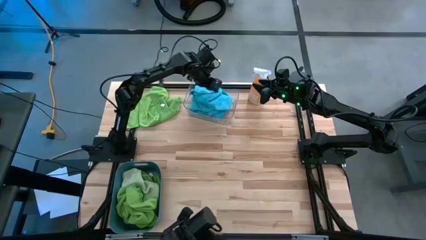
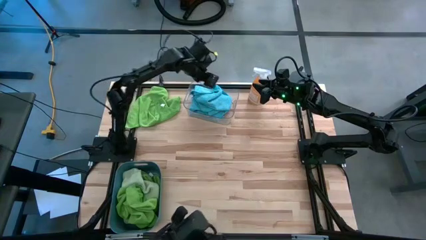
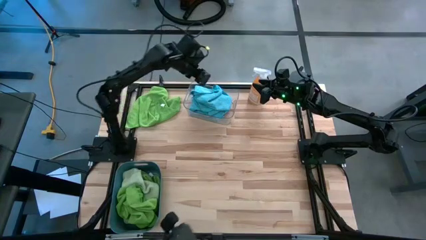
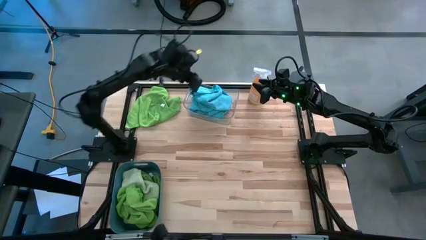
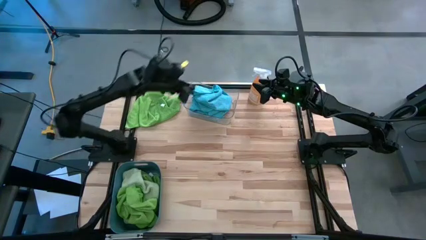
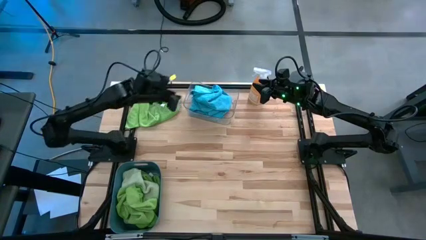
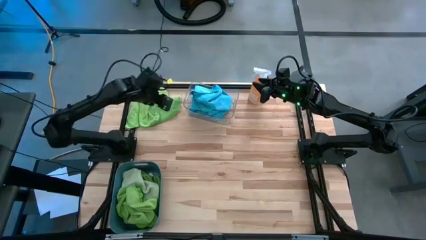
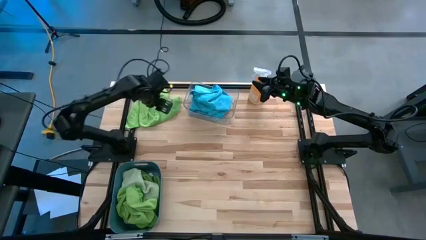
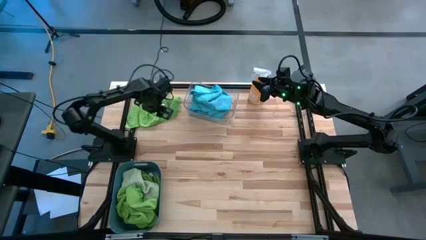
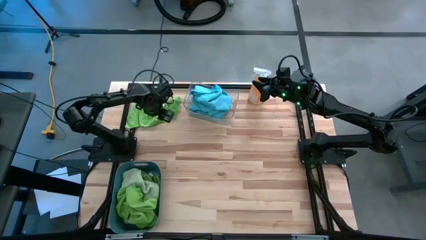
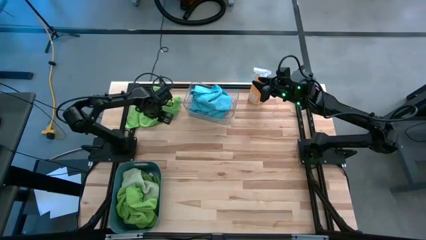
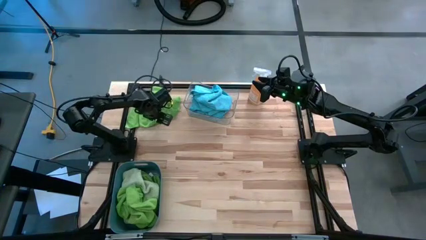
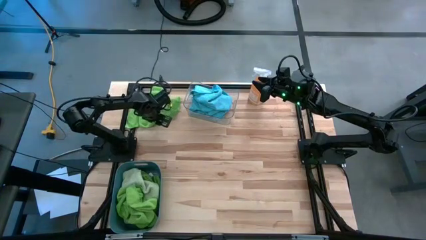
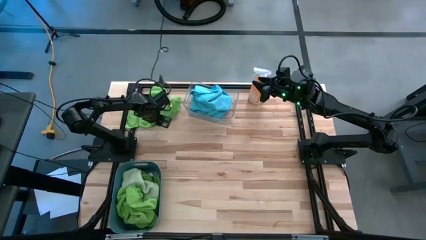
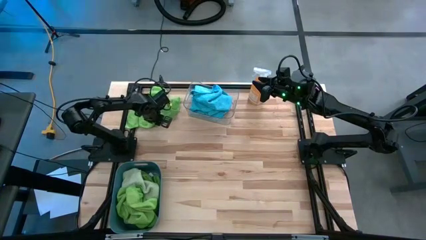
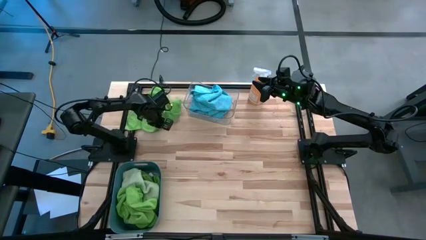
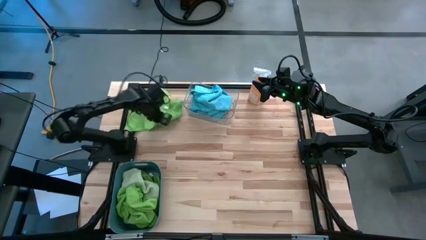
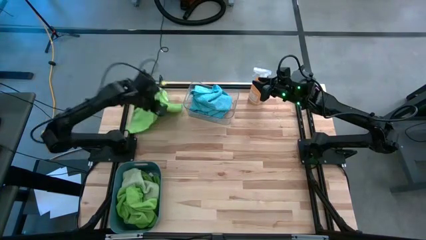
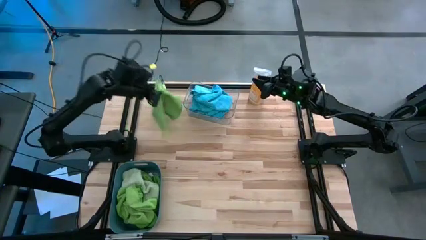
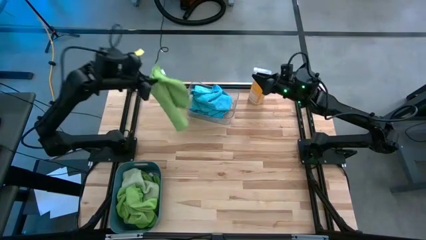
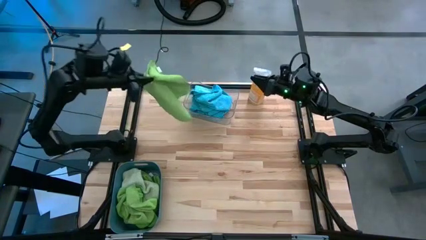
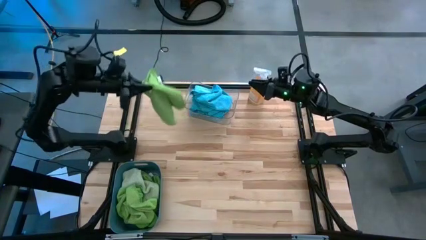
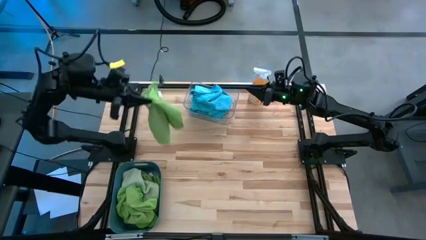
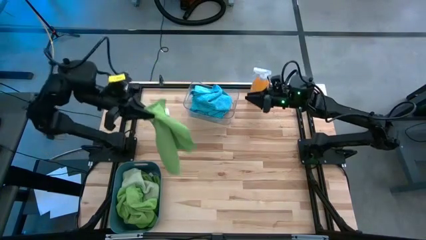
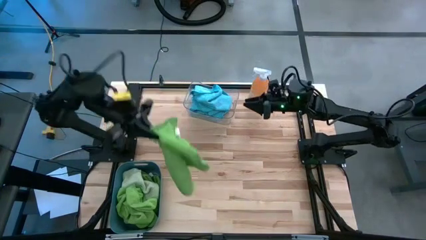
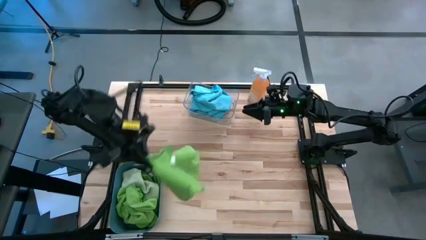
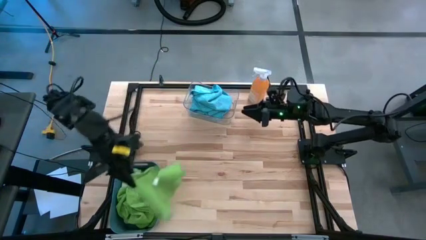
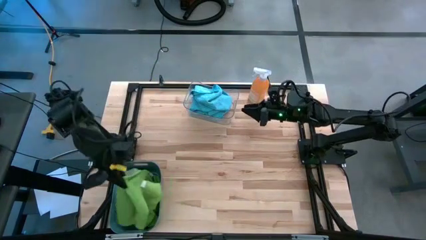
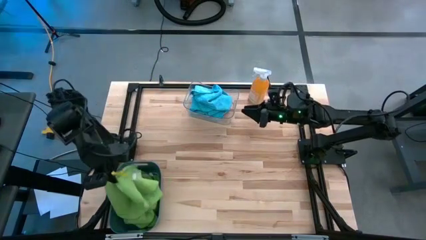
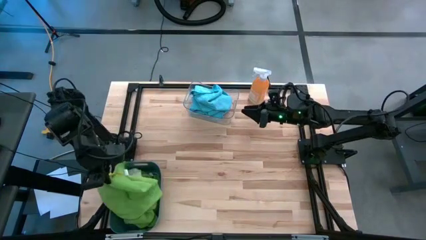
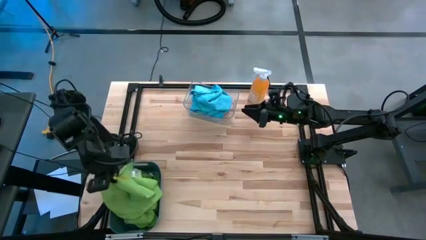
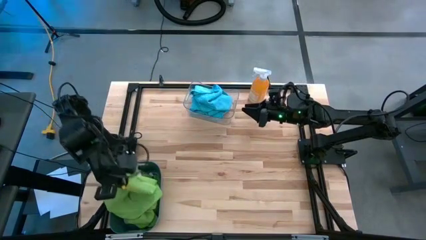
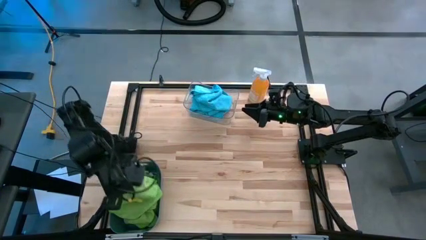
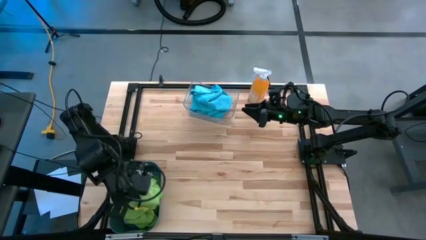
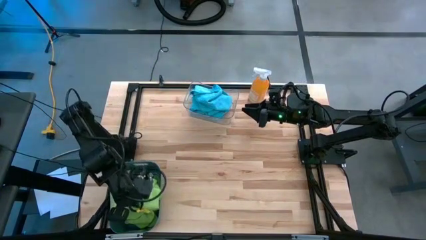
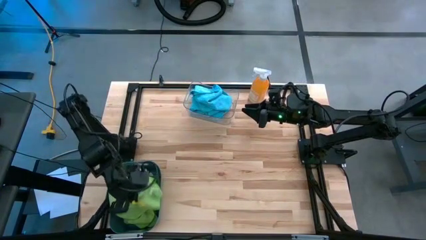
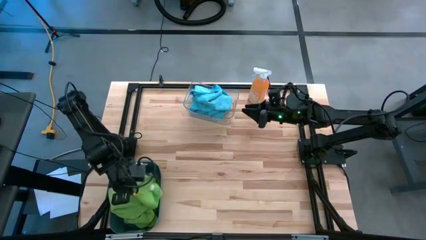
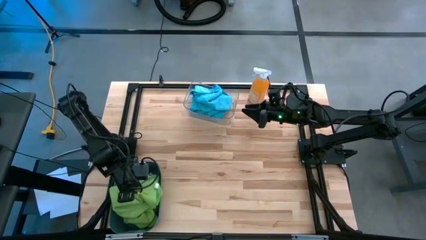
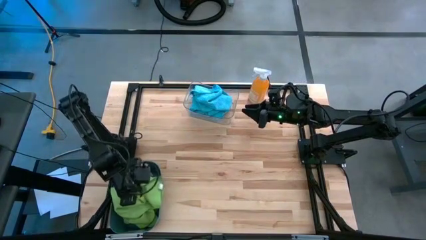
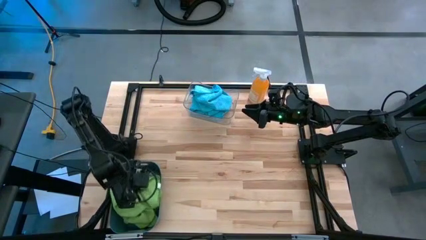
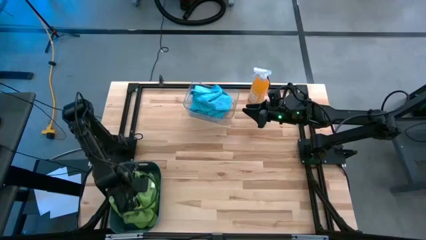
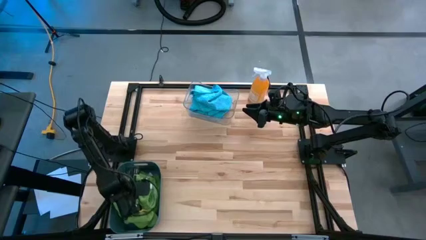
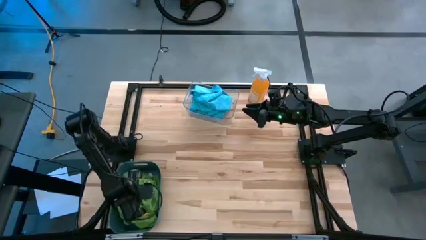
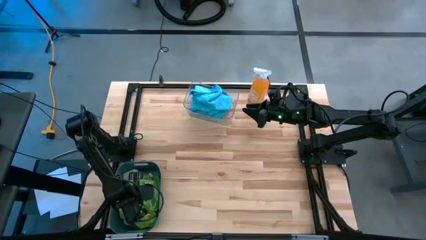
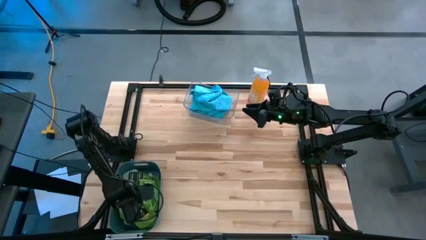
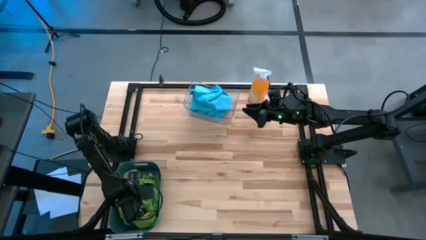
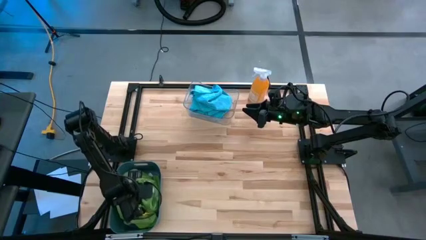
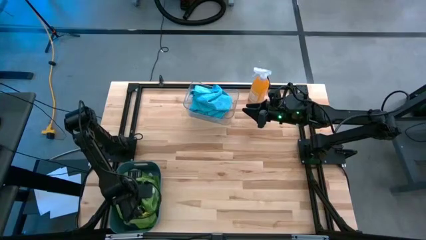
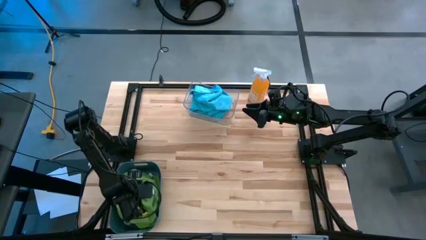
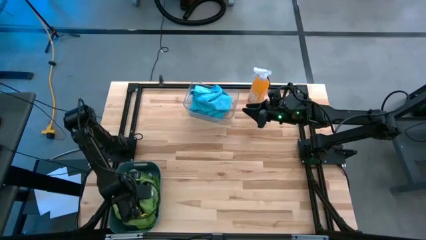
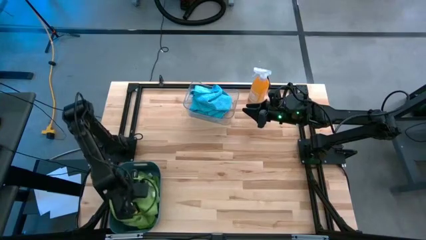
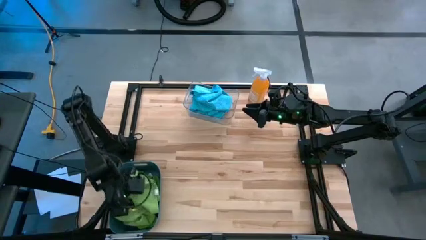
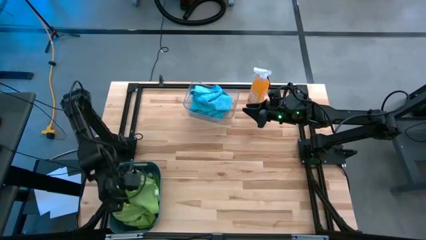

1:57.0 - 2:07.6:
Task: Sort microfiber towel by color & place in baskets
Put the green microfiber towel into the blue bin

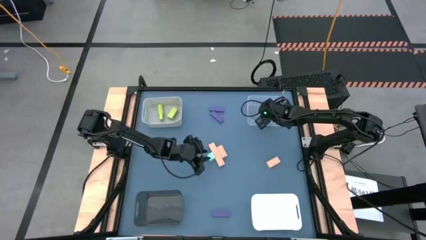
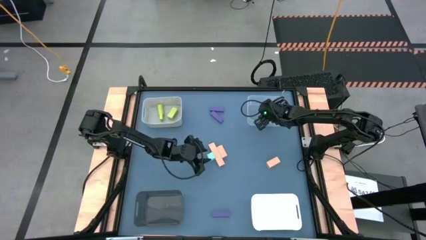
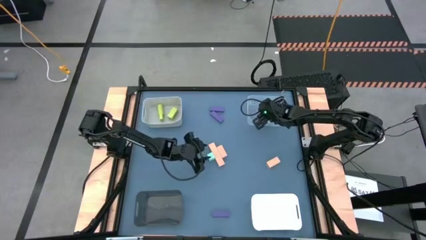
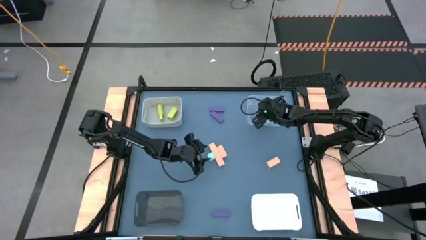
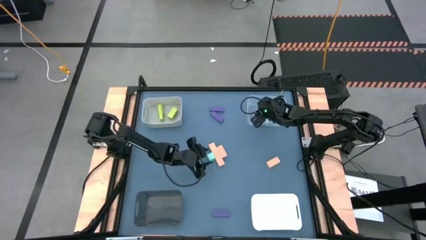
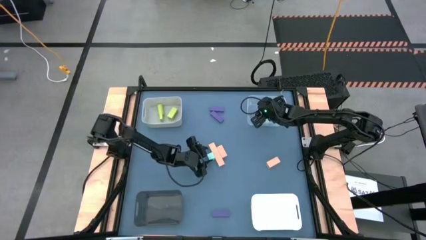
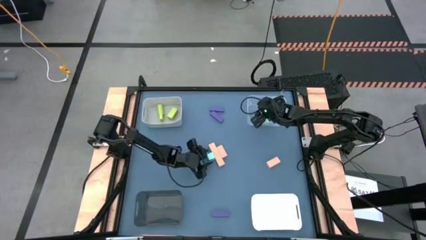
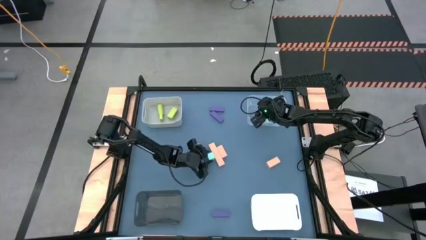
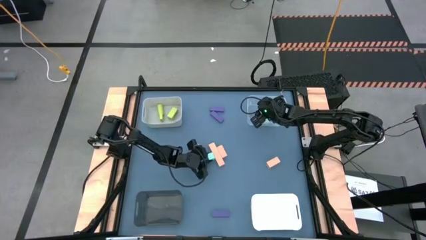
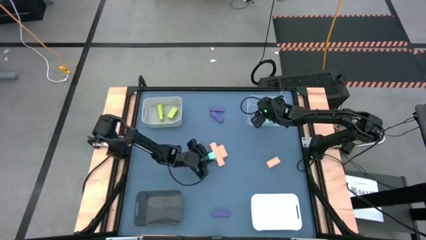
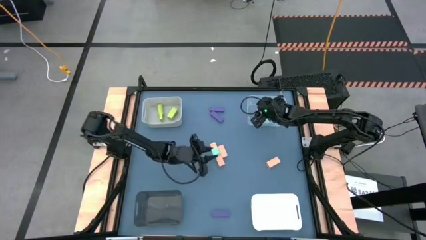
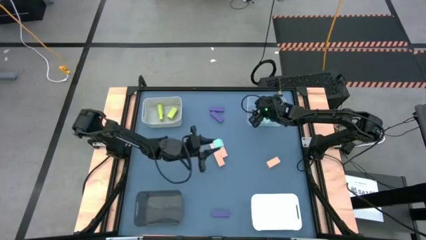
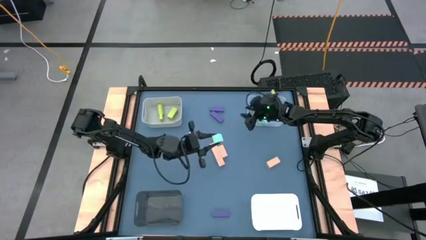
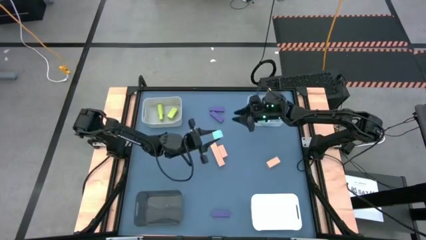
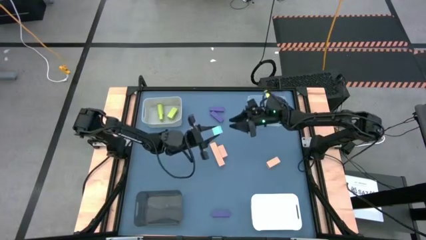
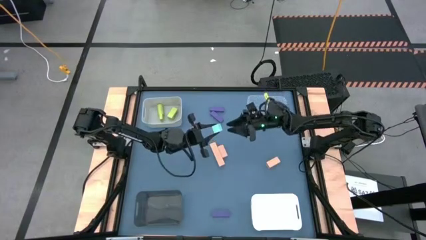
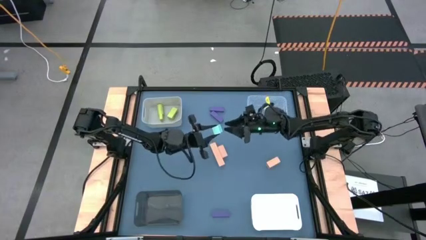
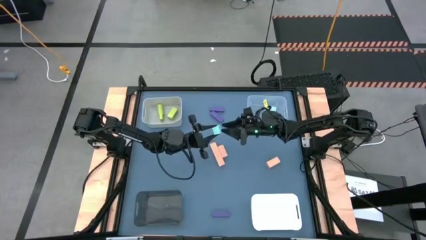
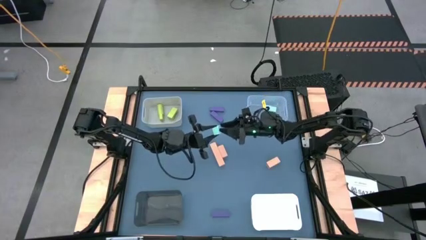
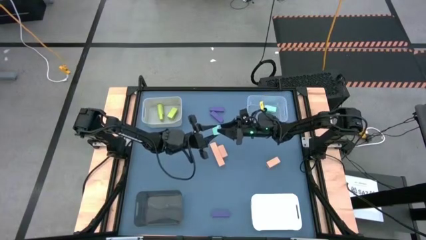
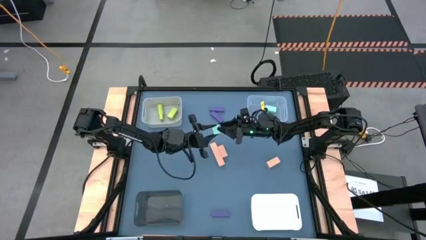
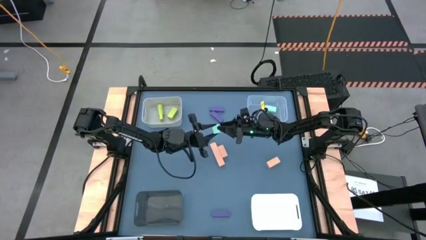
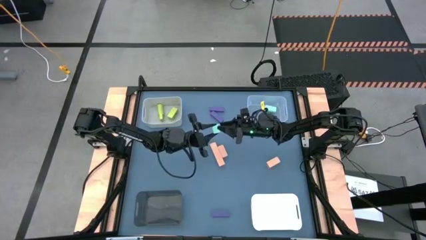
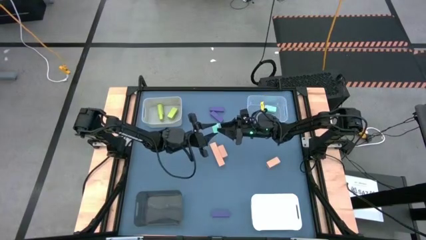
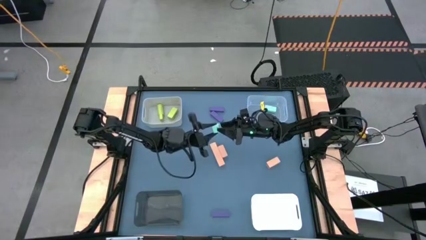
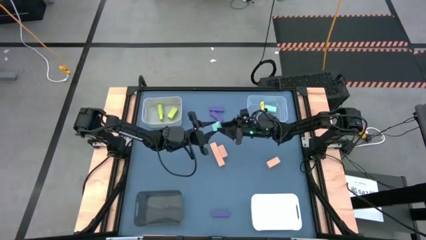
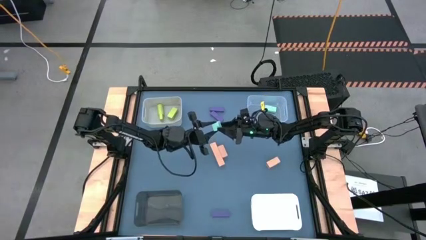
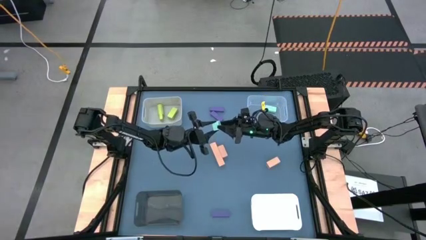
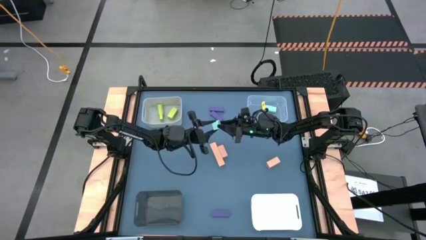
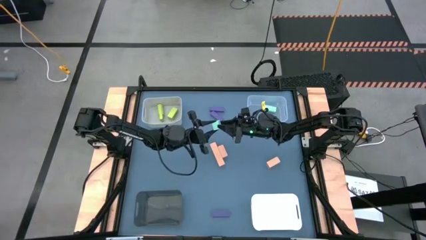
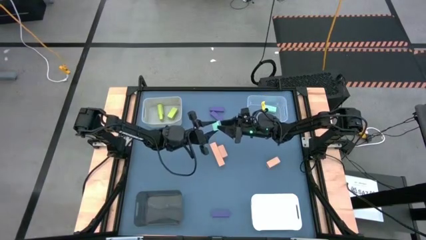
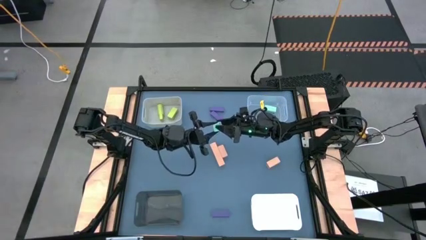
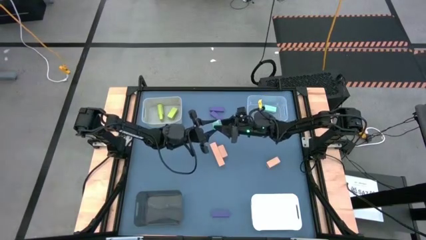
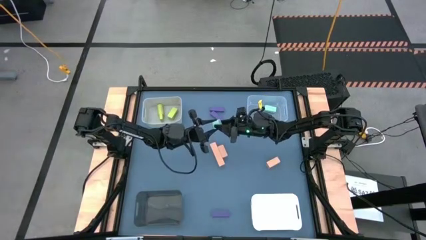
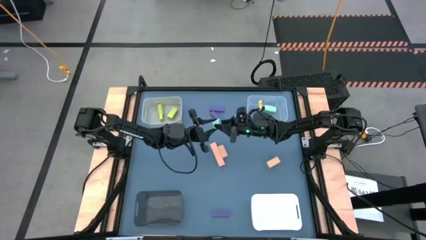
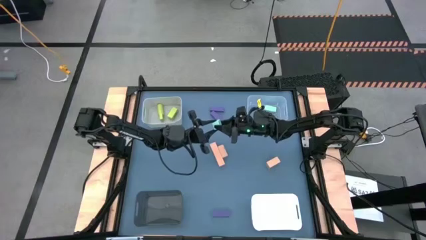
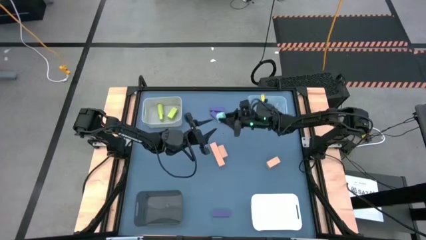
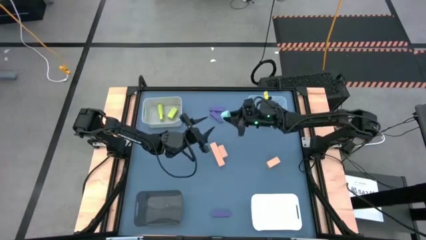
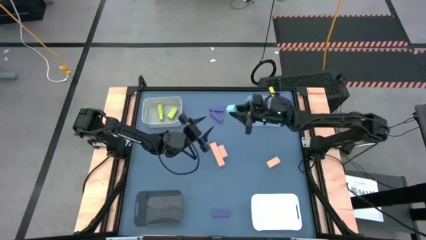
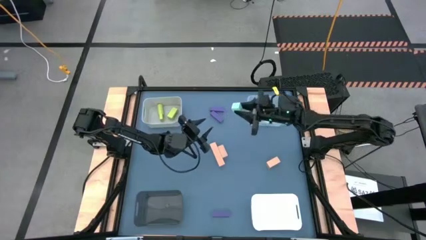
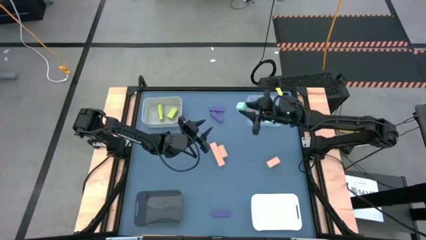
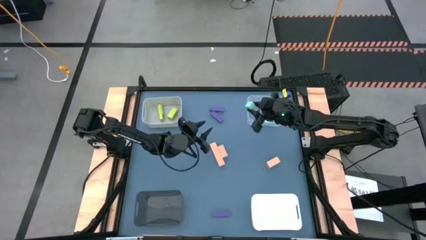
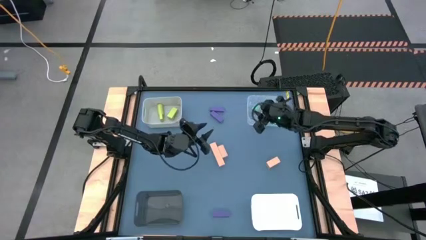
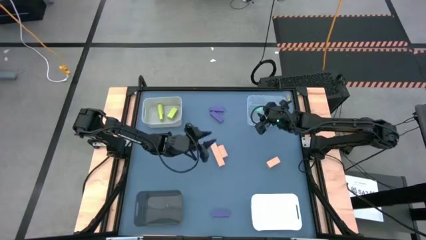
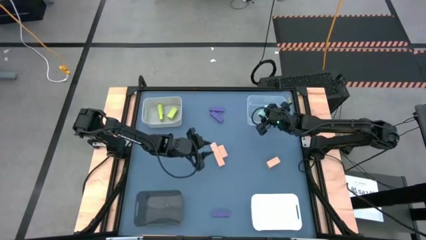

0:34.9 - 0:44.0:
Task: Sort & place blocks by color
Put the blue block into the transparent bin
